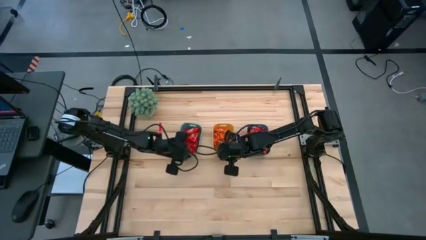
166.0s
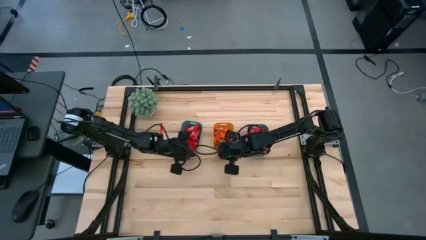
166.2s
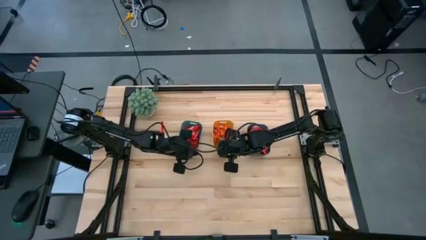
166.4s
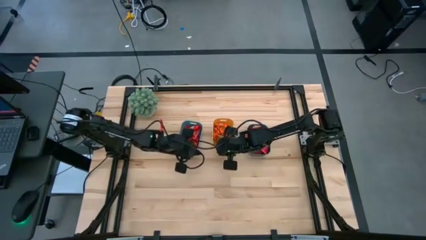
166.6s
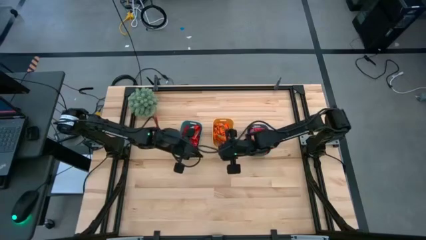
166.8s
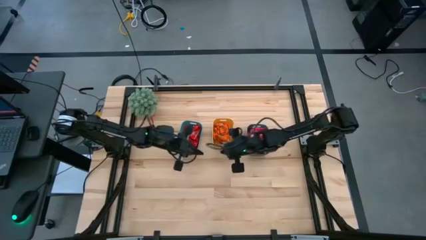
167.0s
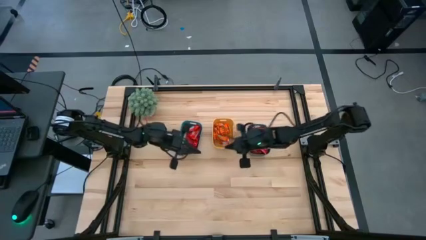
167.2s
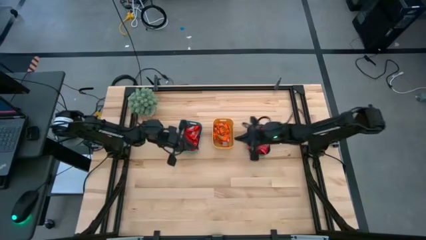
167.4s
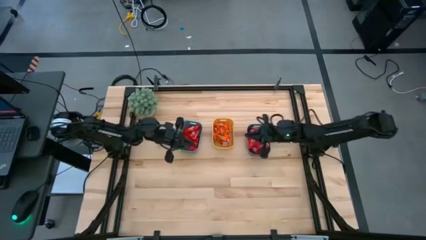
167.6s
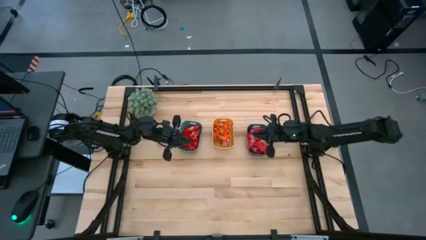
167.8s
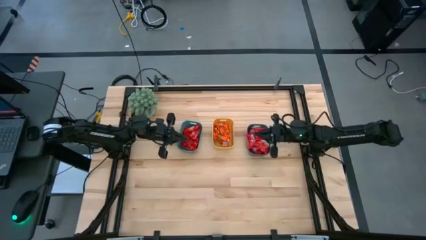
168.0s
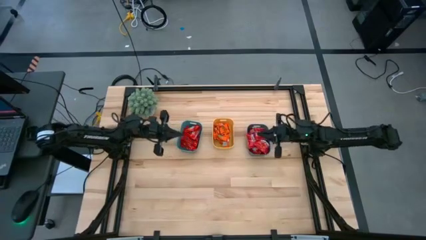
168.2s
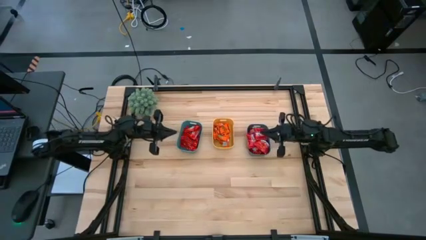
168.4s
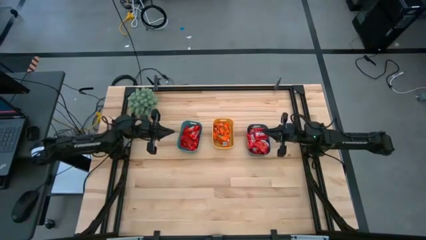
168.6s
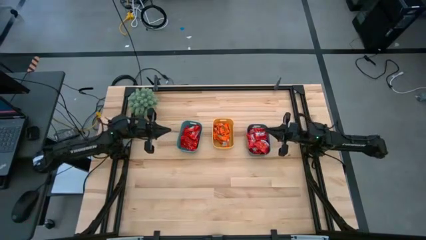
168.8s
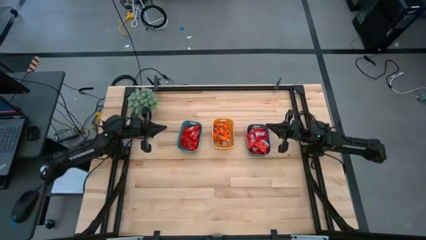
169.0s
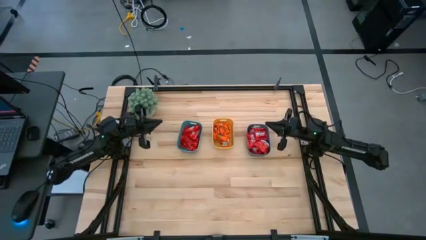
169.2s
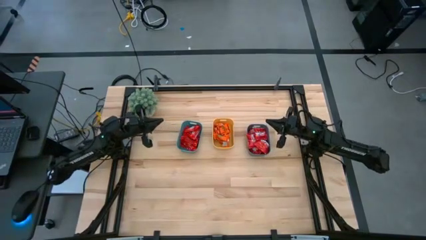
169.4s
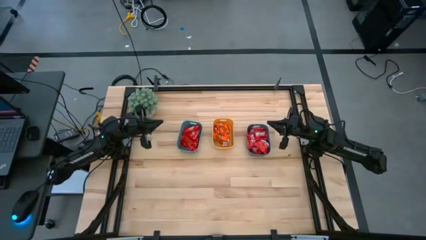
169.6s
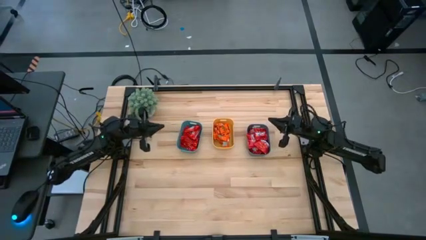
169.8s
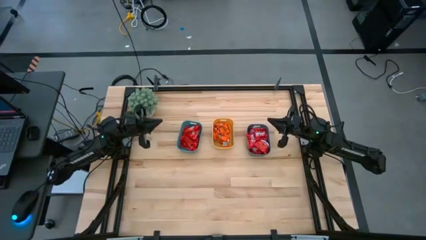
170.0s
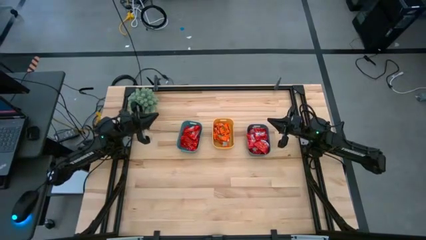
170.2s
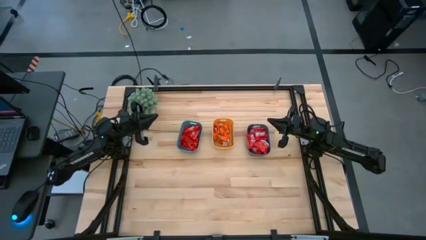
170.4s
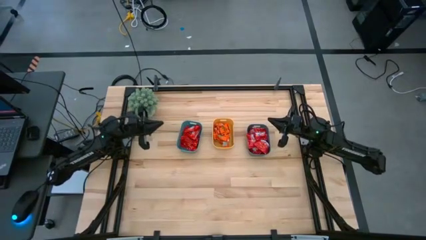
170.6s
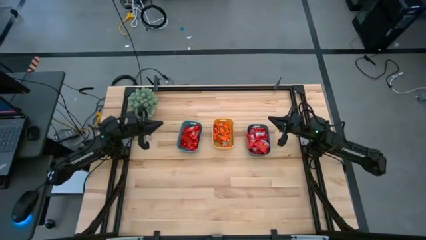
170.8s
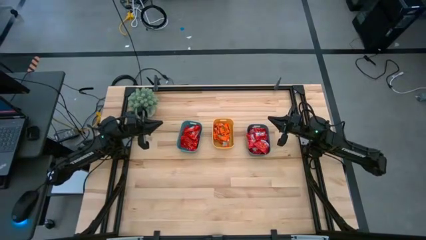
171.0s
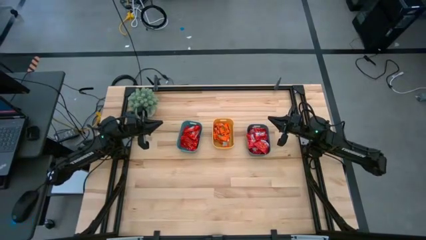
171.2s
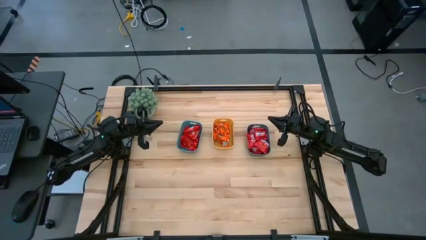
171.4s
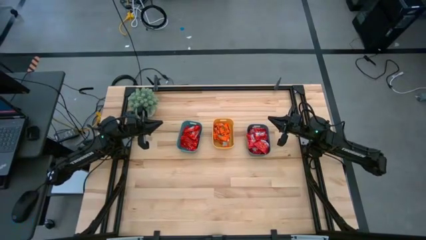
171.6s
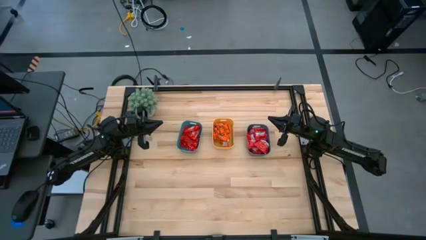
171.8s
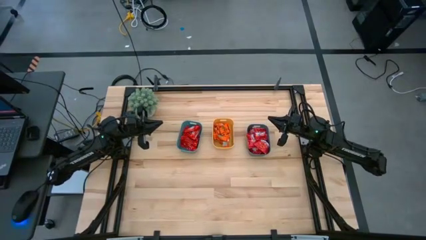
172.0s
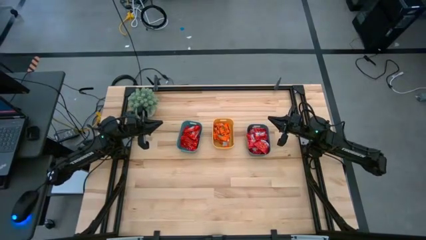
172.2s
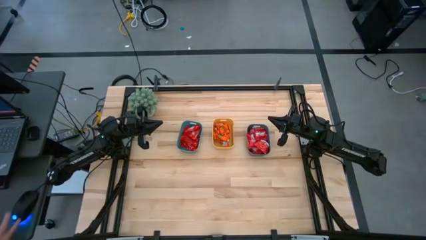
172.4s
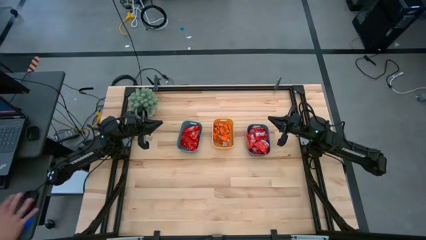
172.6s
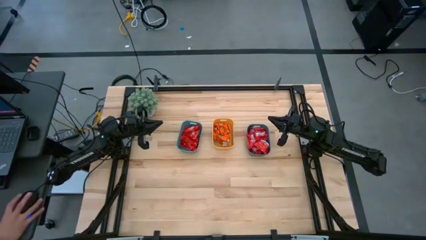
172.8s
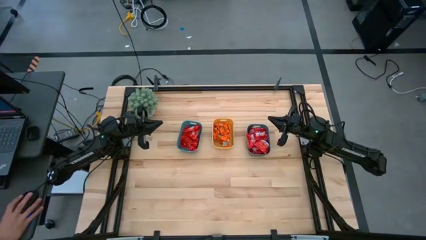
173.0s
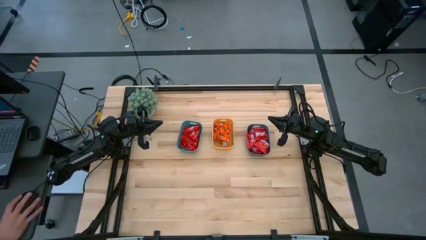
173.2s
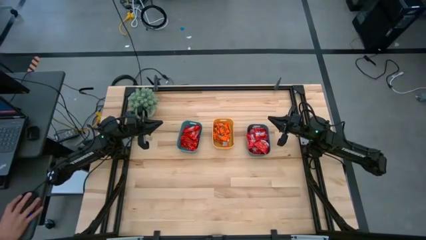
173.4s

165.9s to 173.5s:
Task: Sort candy
Return to Home Position

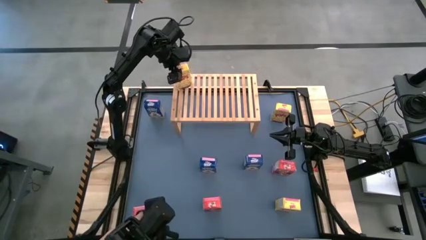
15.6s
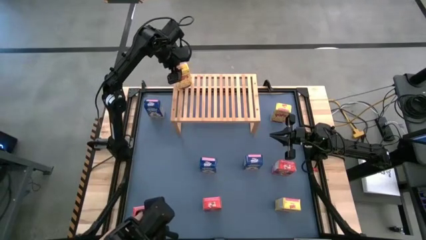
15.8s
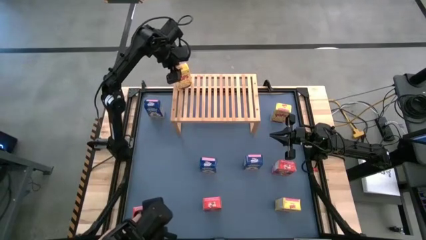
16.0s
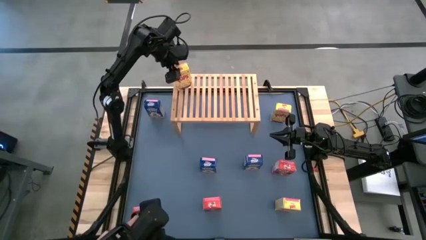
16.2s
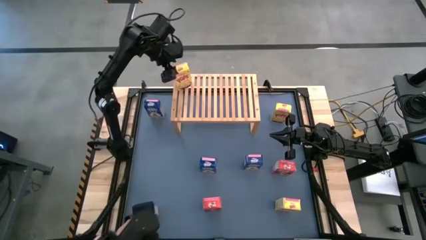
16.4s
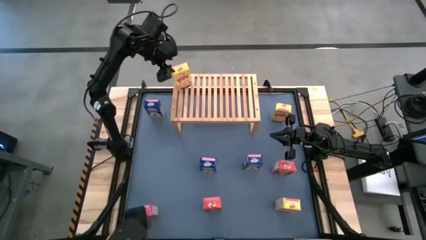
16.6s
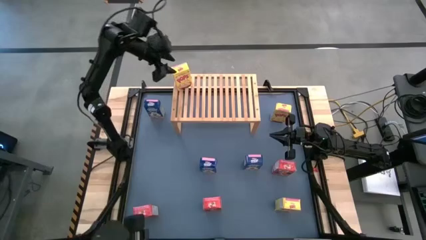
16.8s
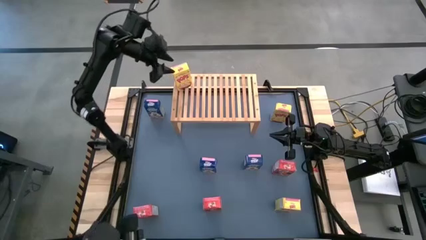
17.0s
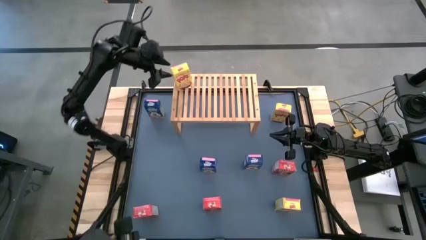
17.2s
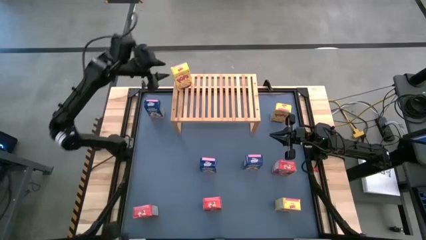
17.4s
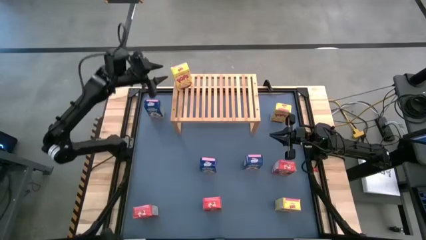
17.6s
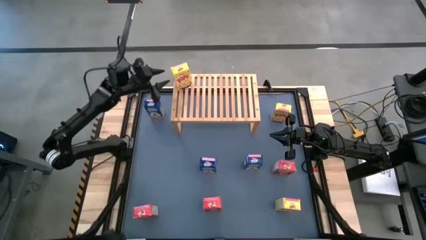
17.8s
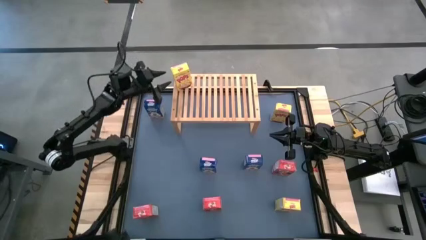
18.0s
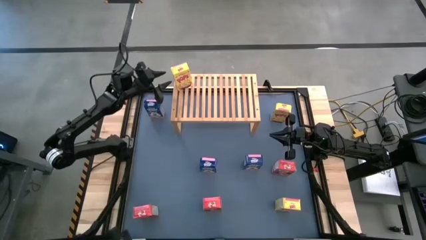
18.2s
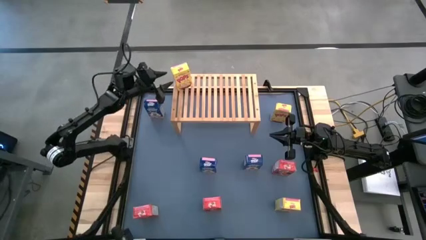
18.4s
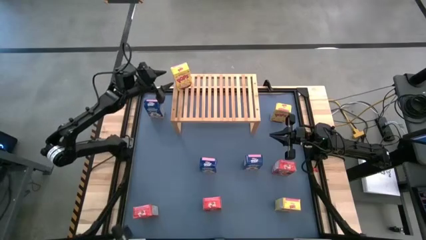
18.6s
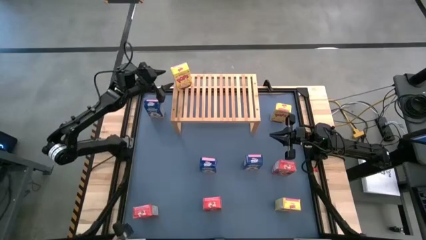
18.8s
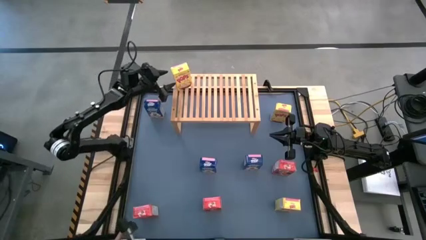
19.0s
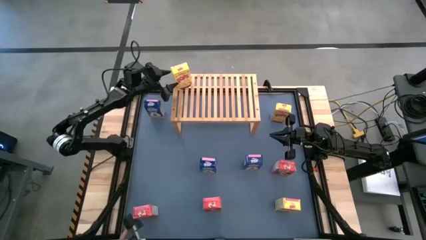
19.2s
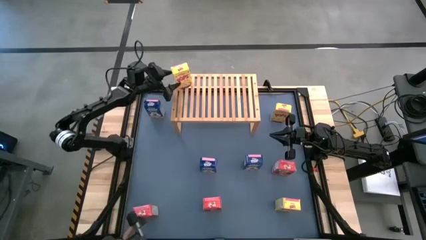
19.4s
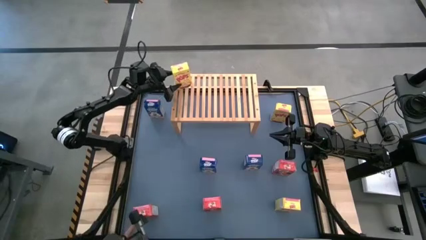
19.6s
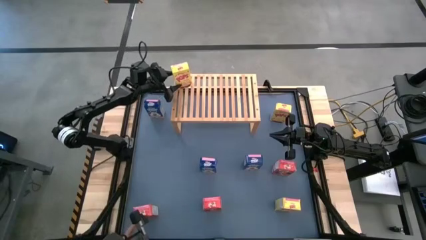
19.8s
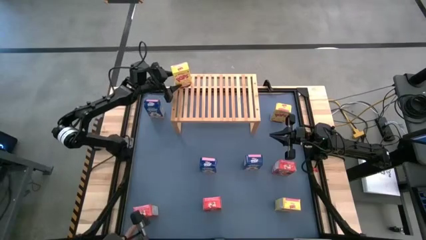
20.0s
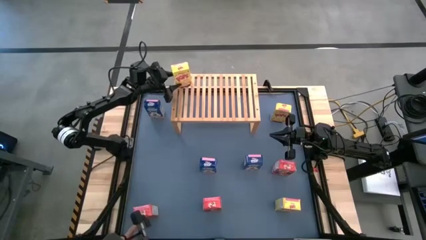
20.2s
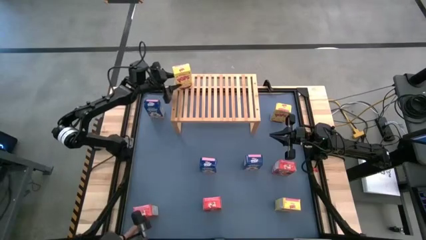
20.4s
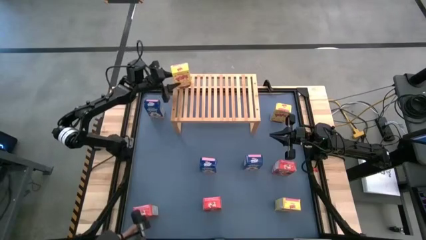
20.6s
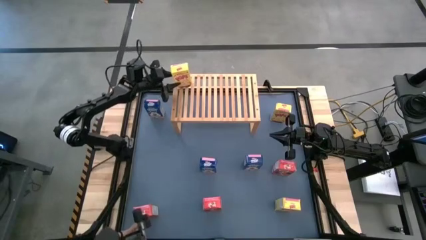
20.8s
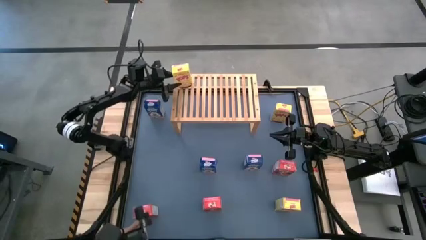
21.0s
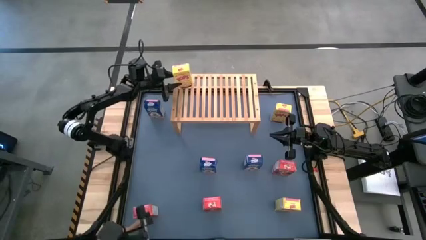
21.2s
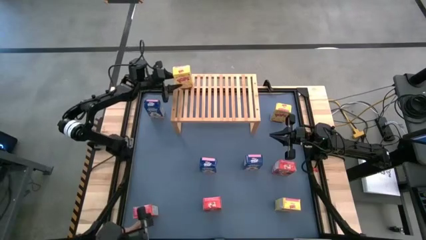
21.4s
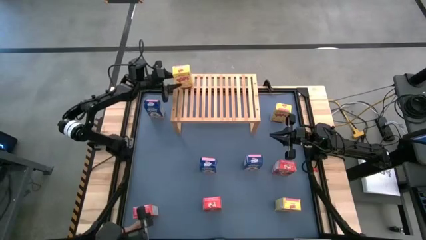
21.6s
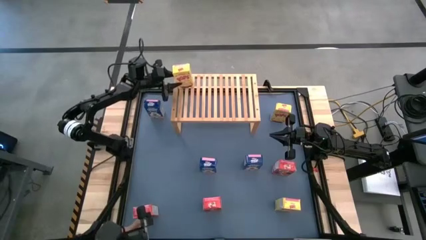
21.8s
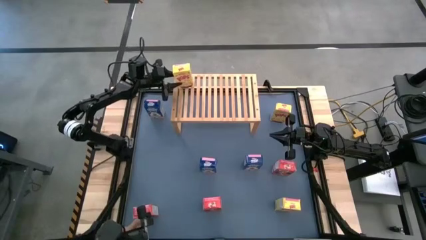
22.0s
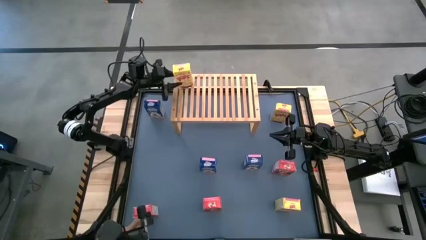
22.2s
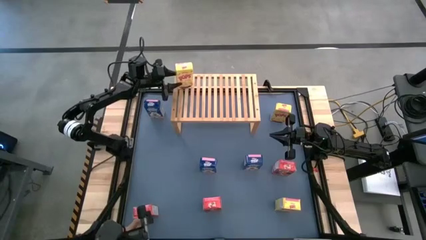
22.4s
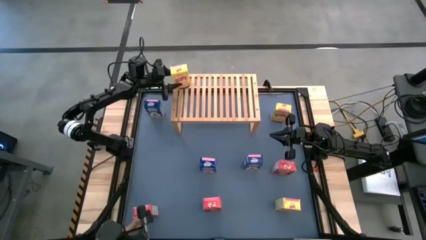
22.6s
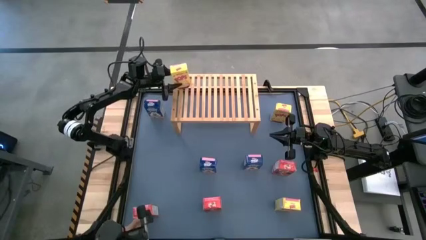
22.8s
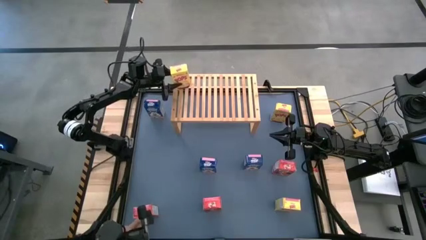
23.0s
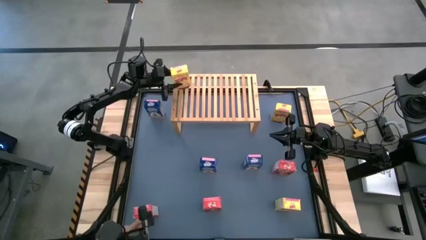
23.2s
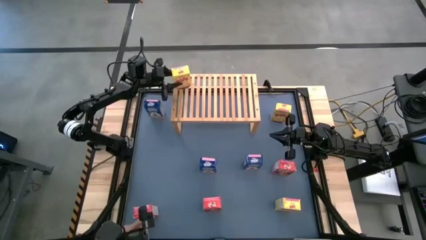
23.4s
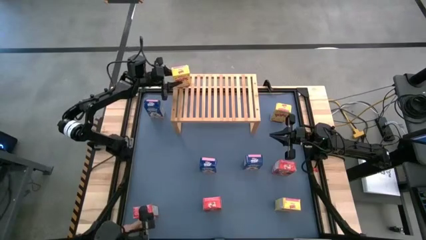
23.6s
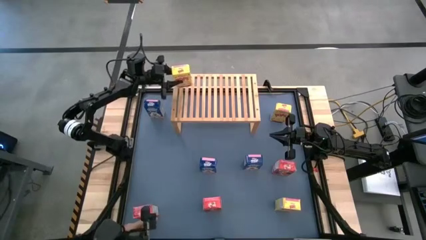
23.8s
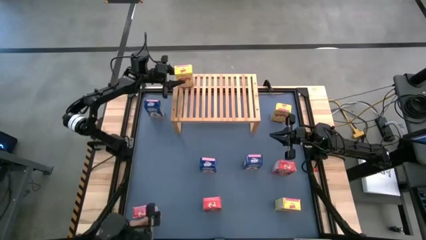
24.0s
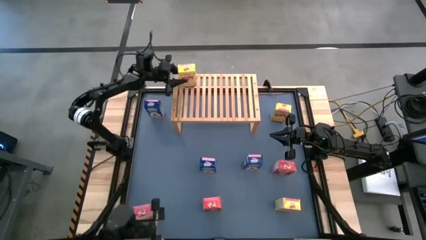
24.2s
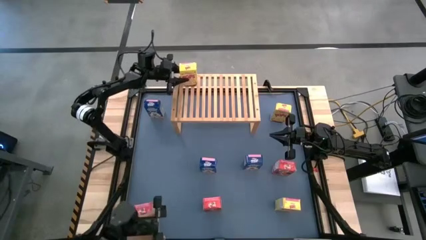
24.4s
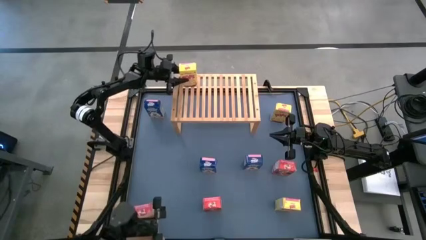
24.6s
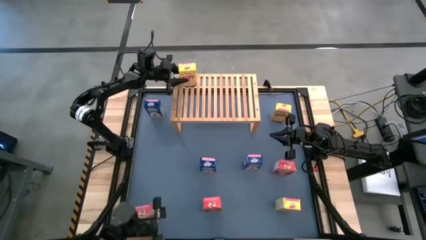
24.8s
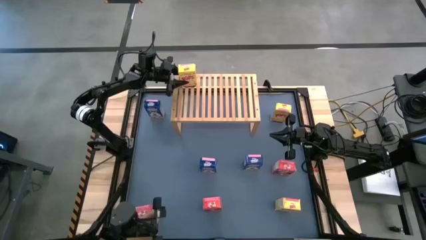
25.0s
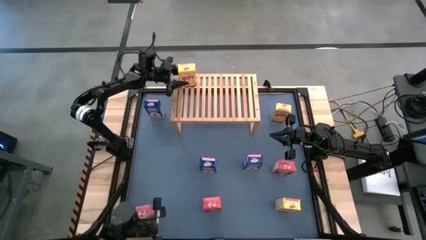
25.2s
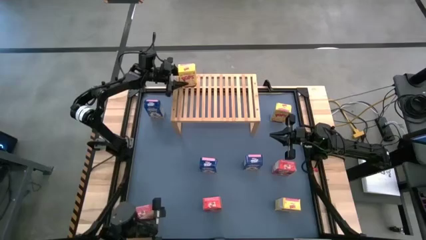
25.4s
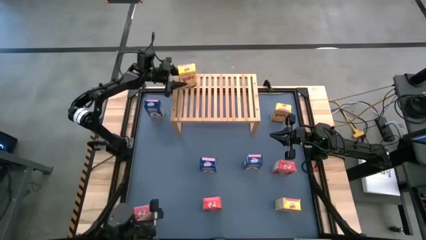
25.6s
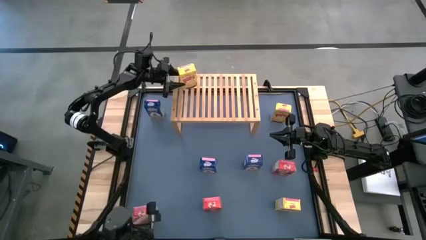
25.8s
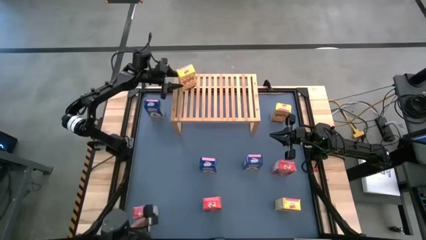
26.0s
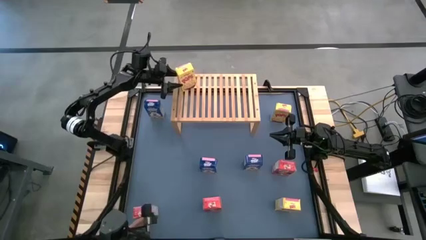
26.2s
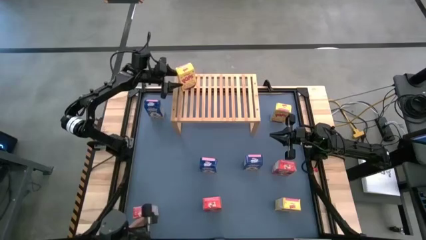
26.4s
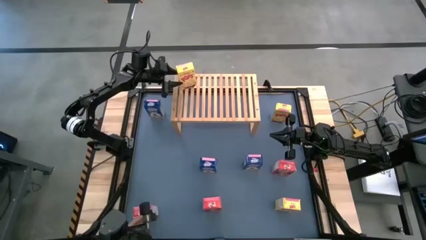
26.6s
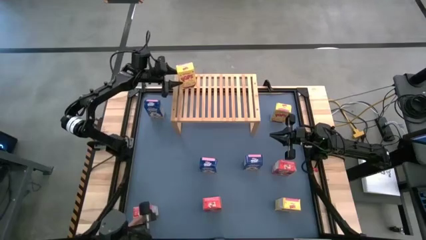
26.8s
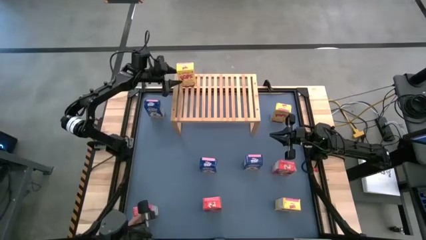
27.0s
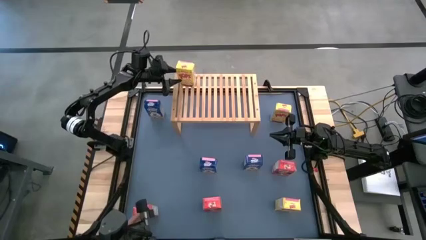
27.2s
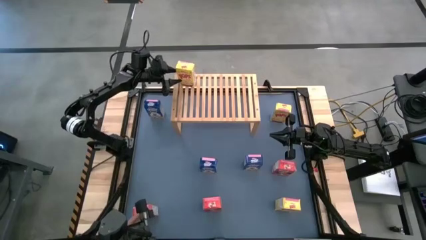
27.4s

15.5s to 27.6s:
Task: Stack cereal on shelf
Put the middle left yellow cereal box on the shelf
